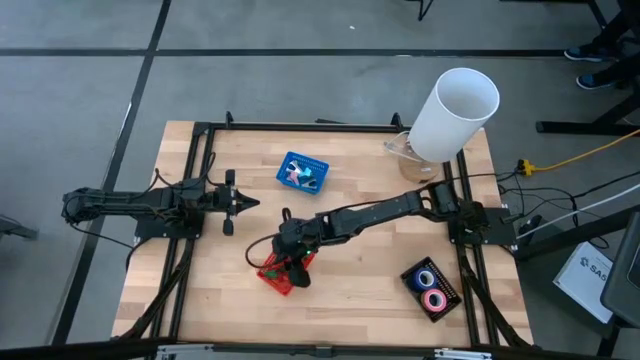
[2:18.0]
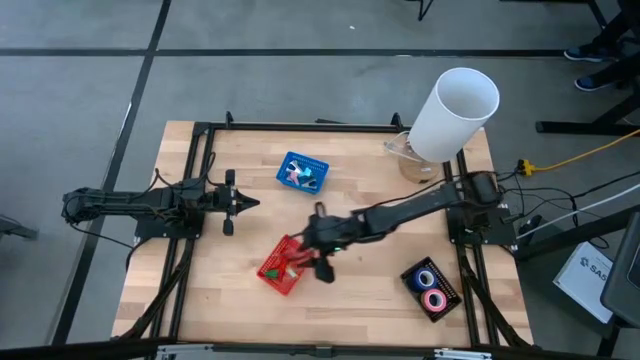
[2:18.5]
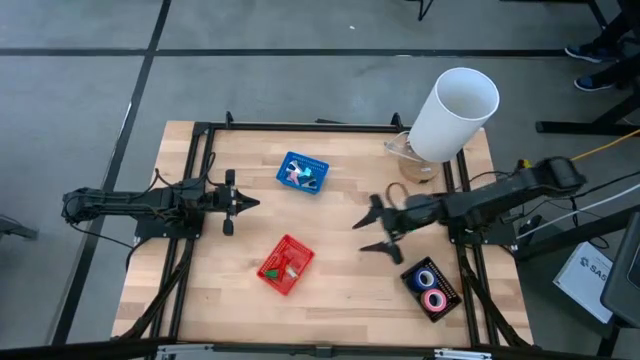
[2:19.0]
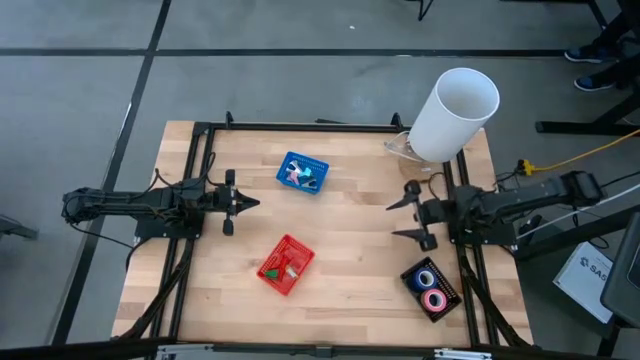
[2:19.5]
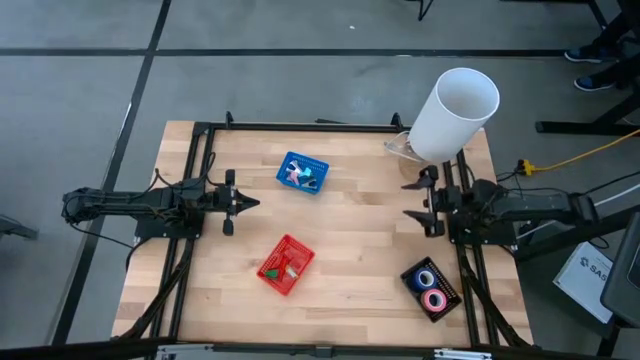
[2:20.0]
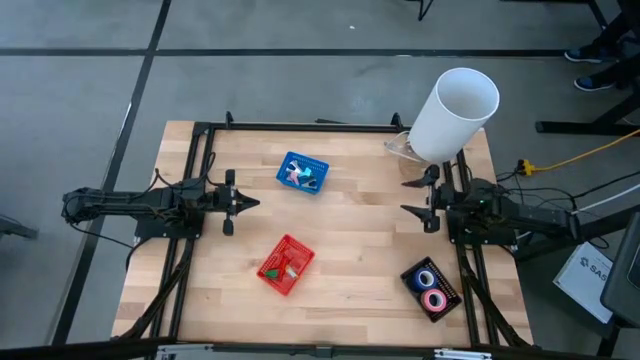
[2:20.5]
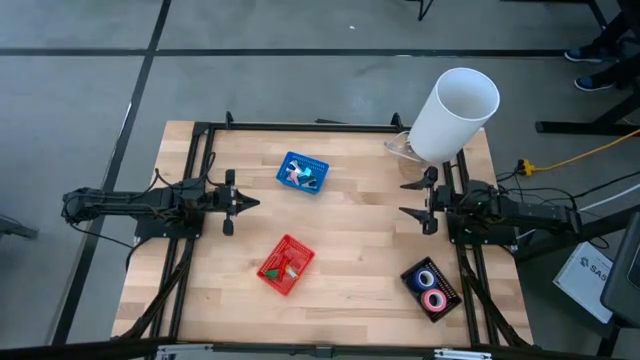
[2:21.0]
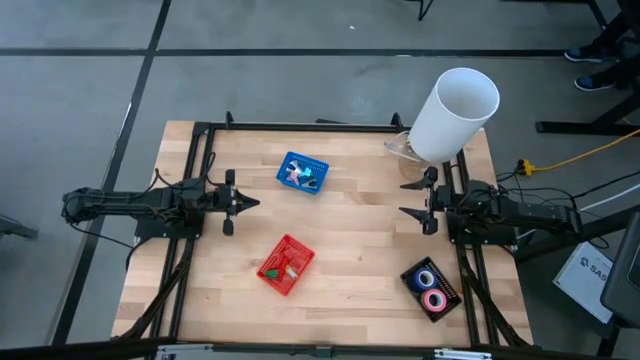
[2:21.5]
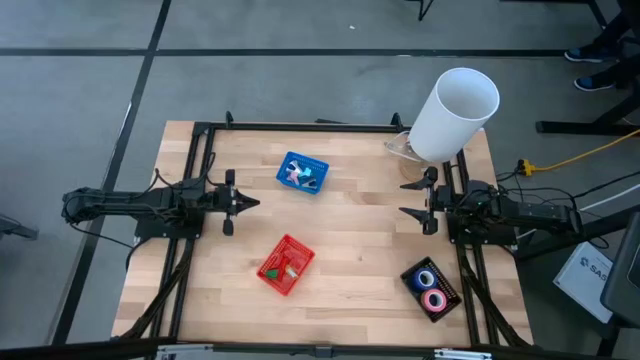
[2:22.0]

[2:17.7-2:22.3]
Task: Pick and place Stapler, Stapler remover, tape
Return to Home Position

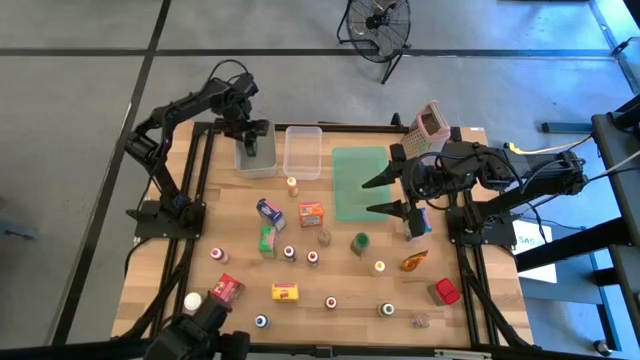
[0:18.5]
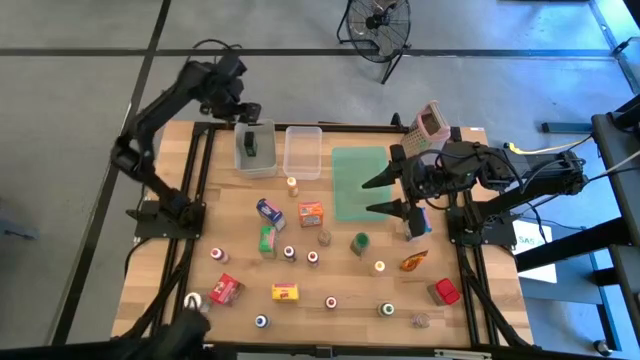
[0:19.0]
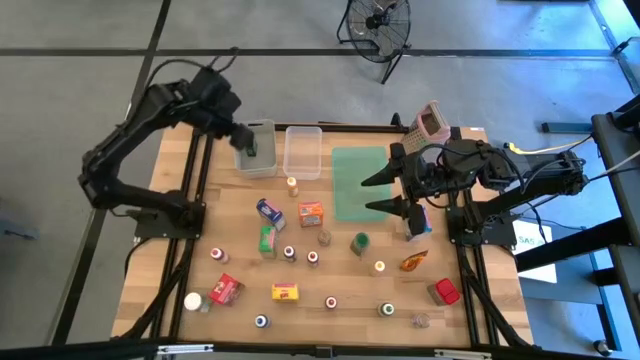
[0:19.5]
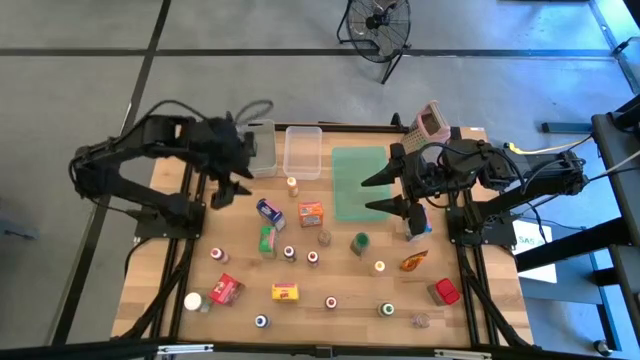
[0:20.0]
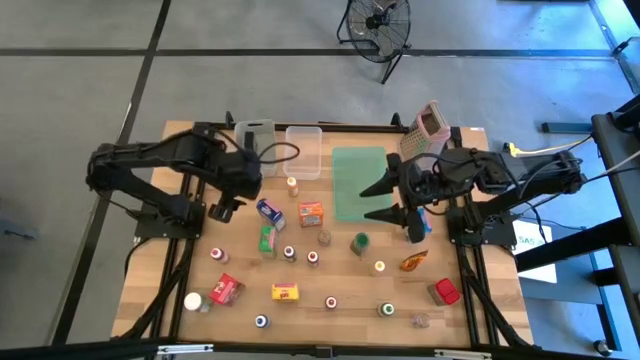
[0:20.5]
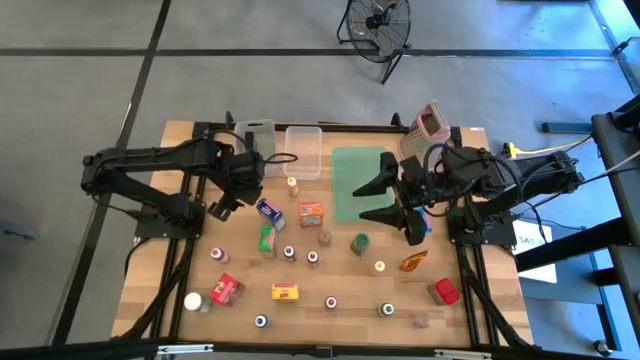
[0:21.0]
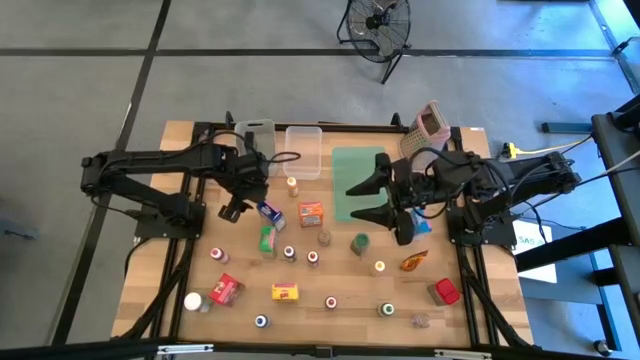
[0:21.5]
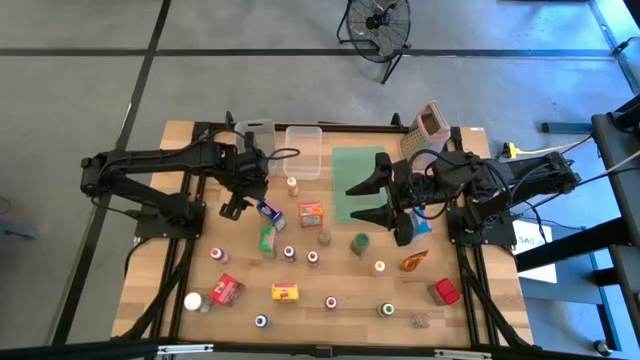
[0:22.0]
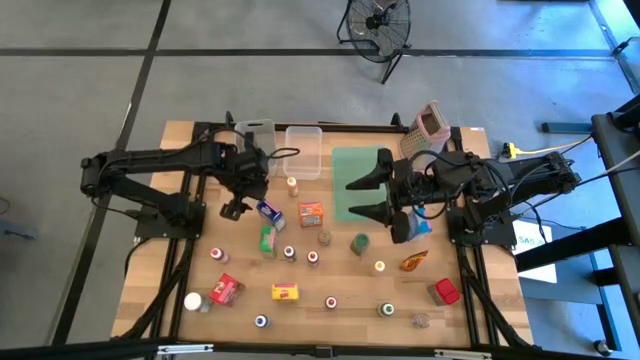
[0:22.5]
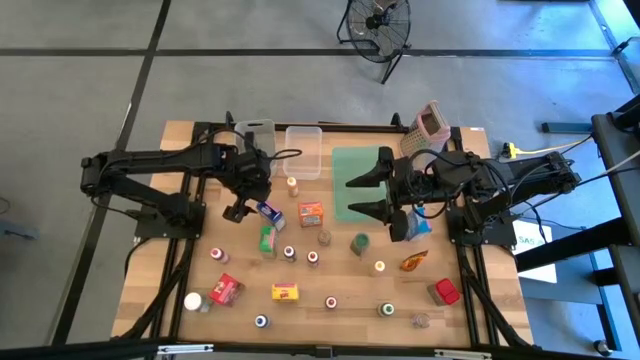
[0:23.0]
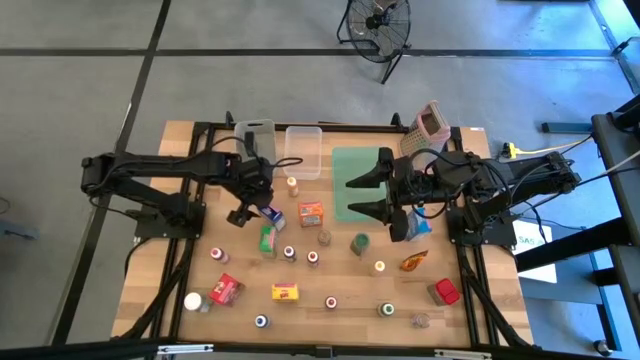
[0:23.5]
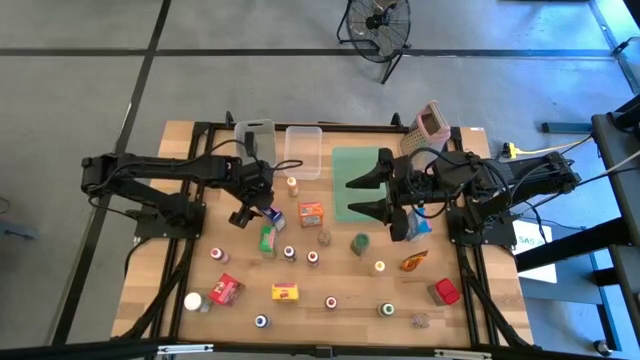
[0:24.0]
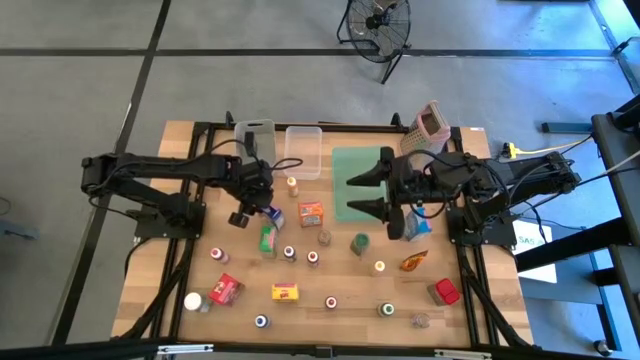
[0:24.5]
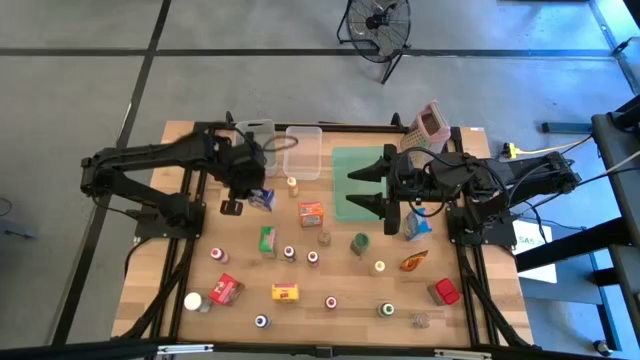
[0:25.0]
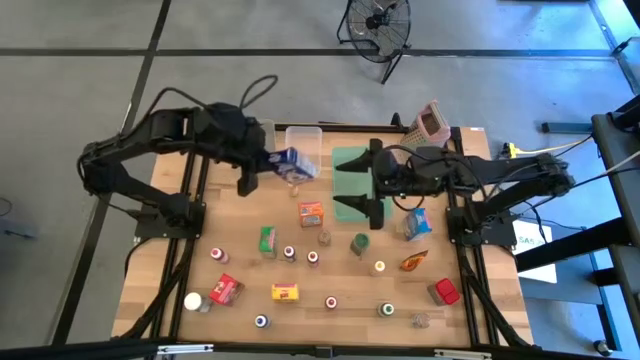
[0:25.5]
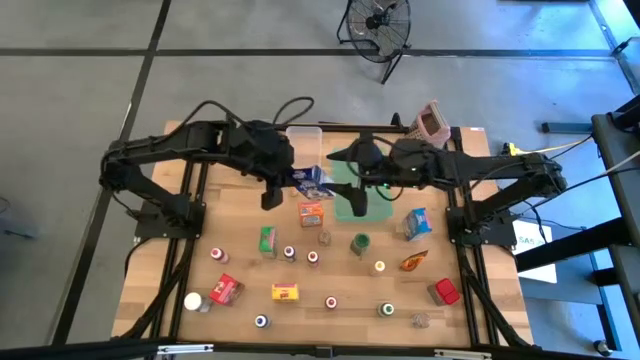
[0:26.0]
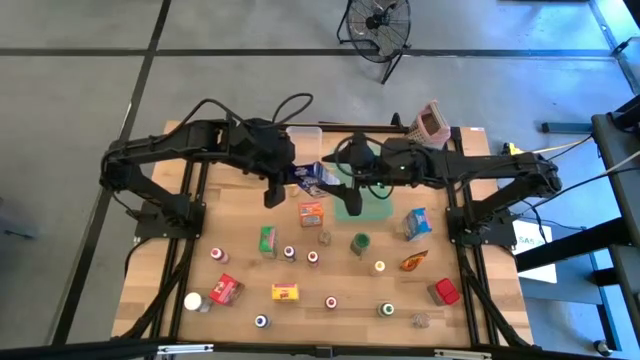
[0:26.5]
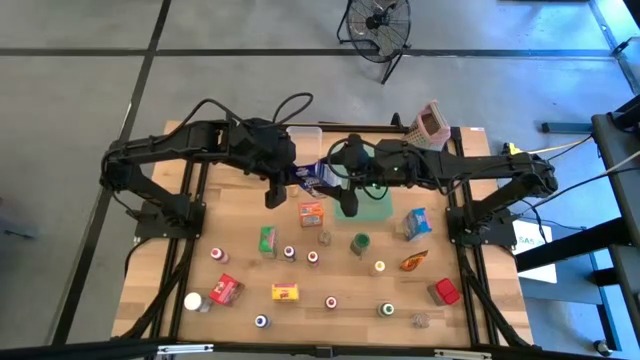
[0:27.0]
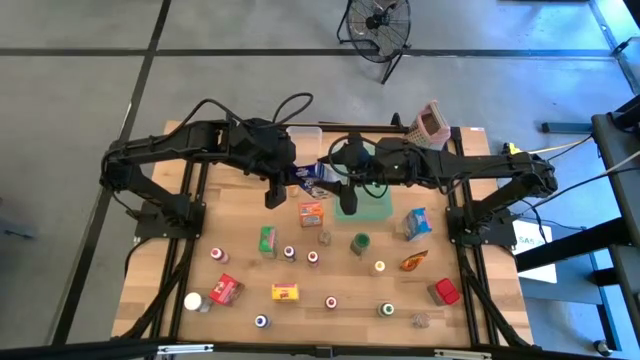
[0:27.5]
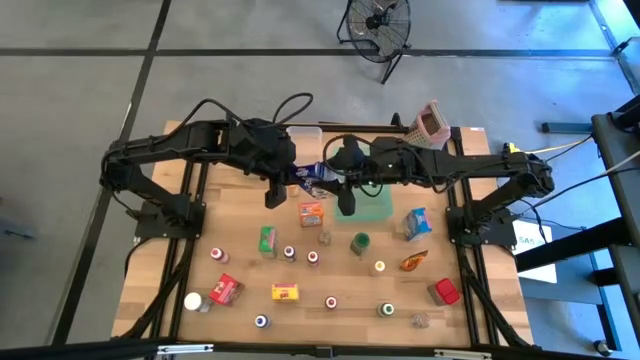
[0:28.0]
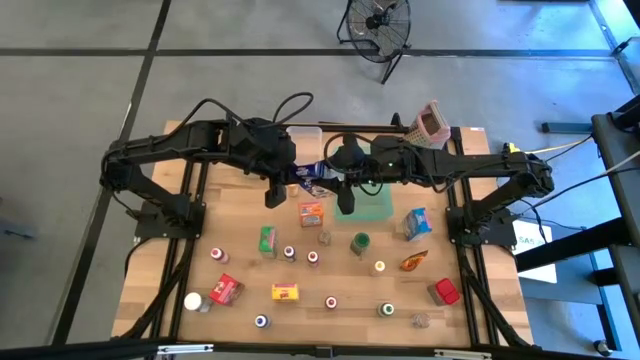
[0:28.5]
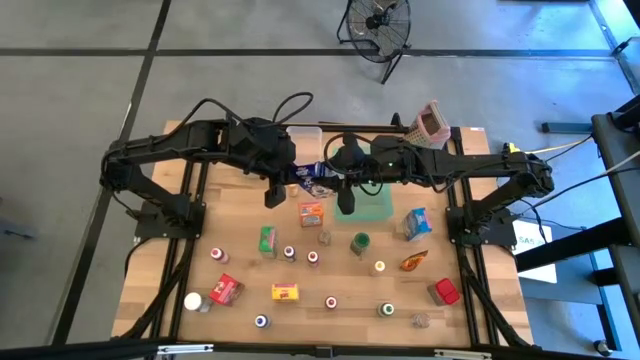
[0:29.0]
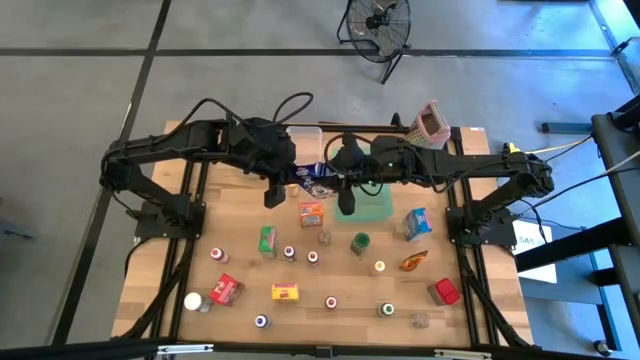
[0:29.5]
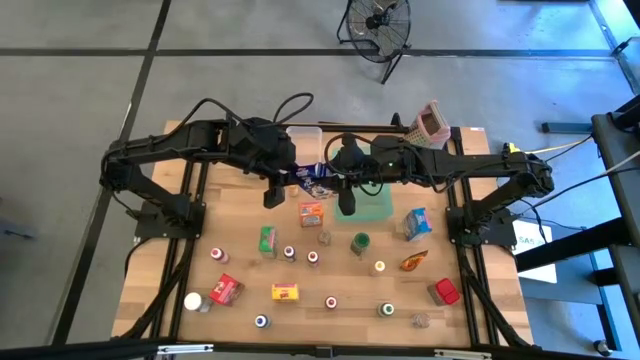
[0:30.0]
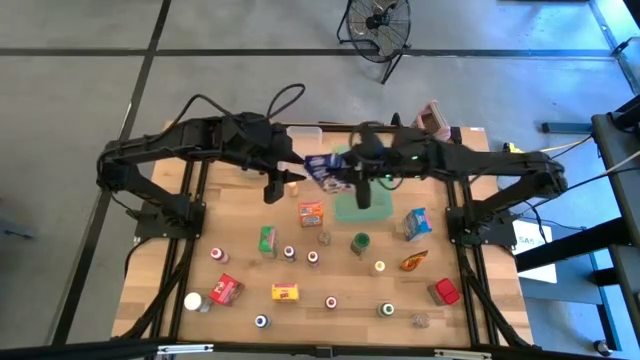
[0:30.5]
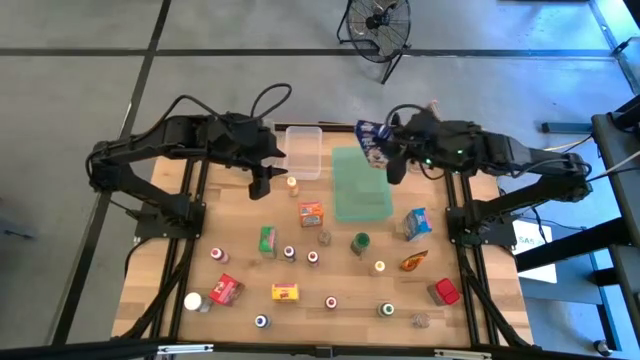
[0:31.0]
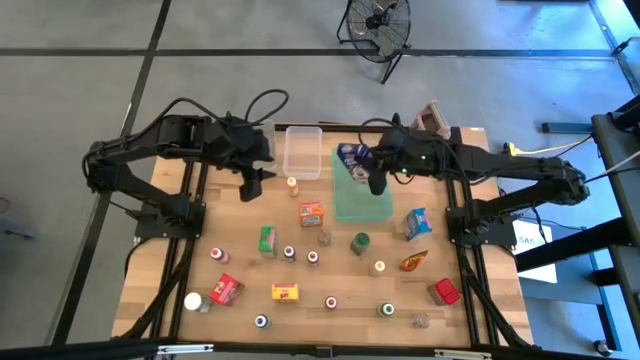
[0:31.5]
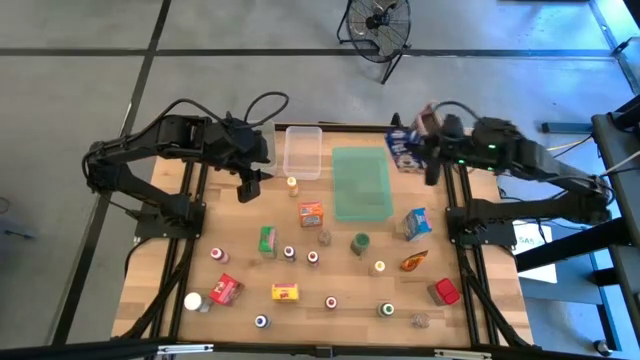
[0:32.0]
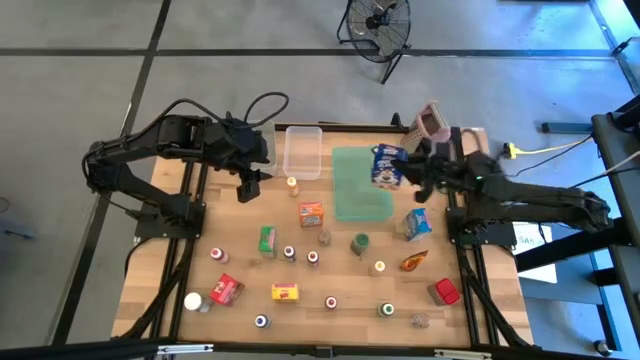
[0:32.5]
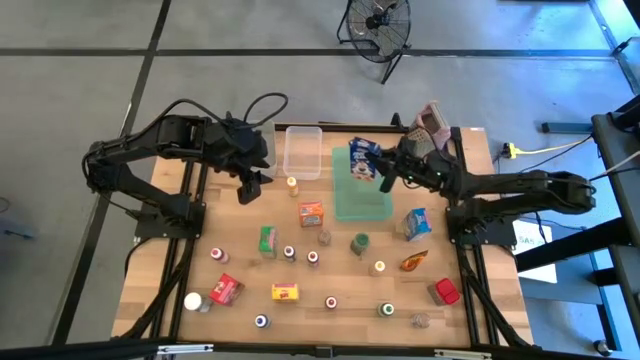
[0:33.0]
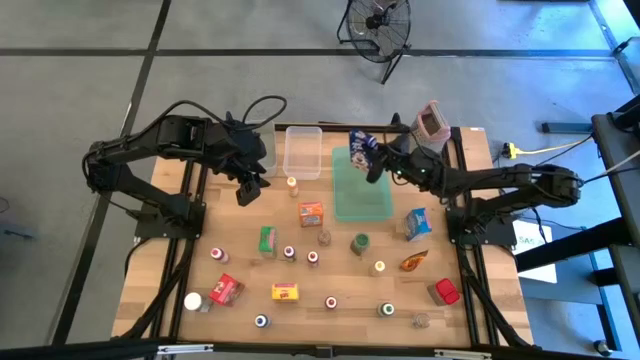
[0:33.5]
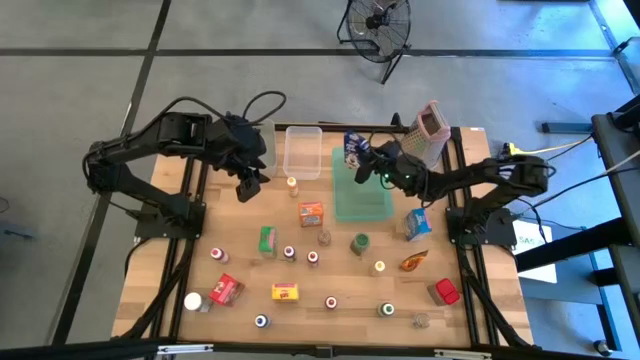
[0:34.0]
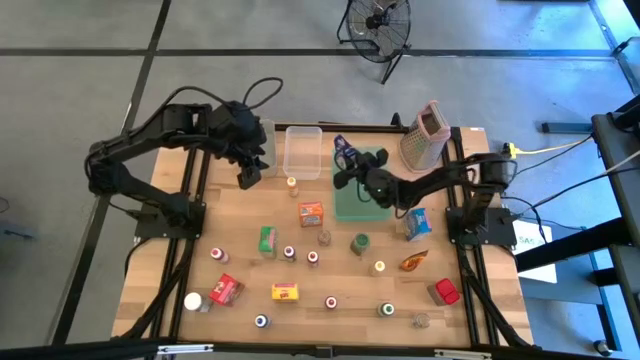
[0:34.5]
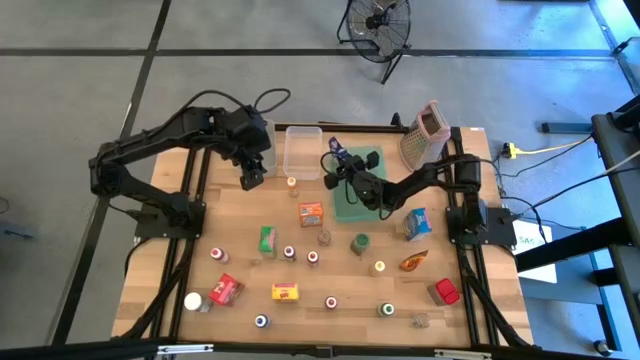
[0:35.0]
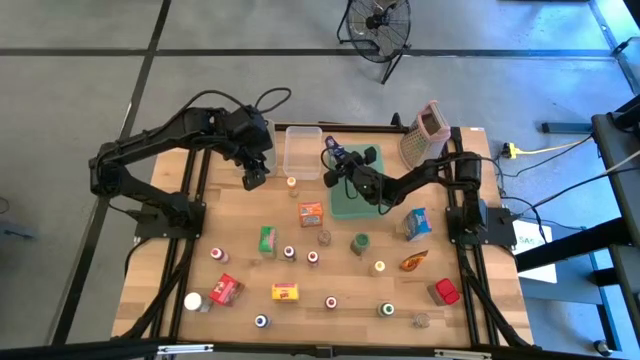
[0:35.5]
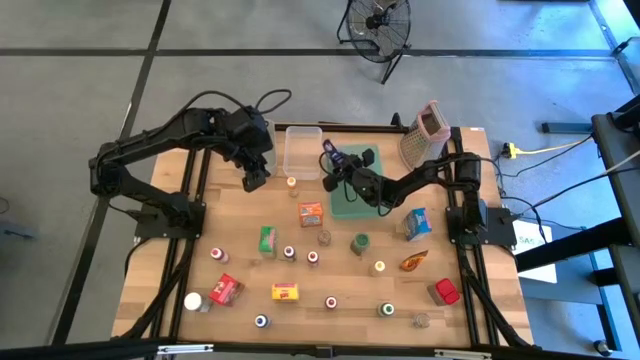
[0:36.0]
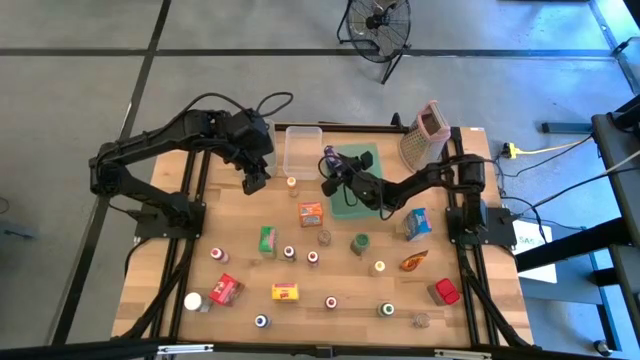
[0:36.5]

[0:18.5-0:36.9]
Task: Pick & Place Kitchen Items
Put the blue cereal box into the blue bin
